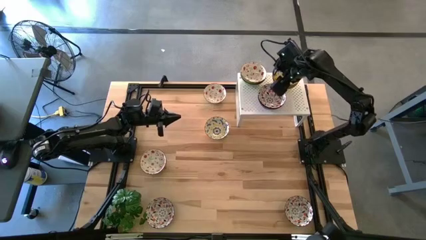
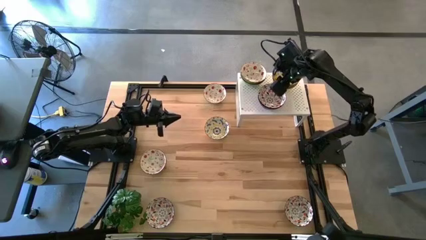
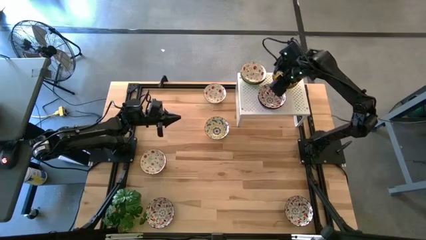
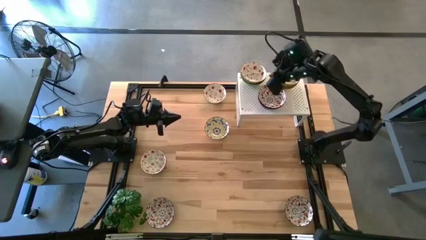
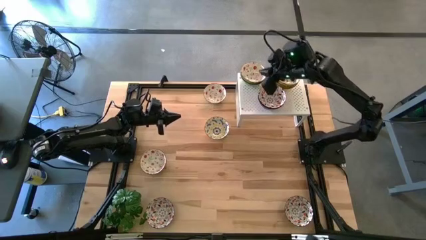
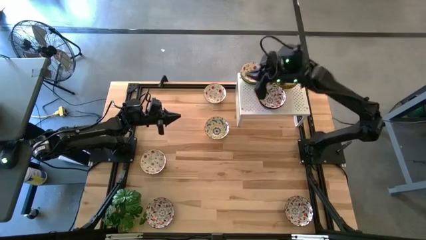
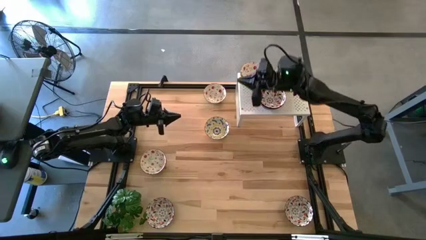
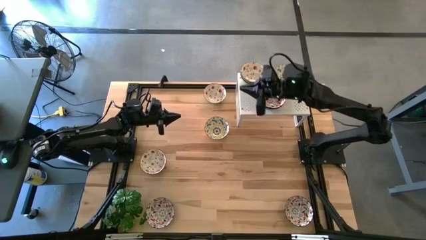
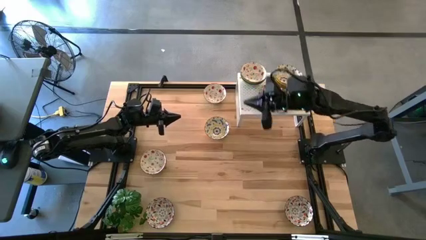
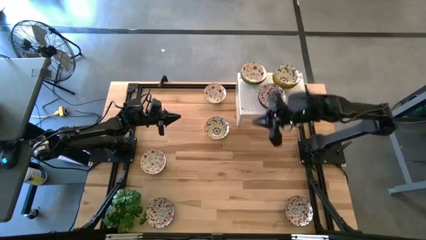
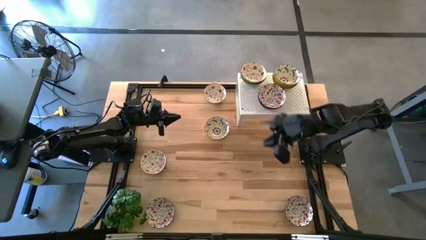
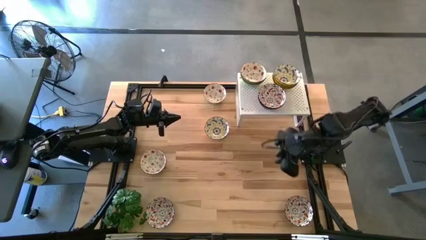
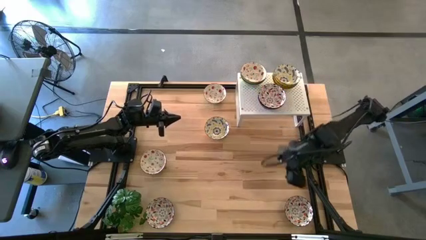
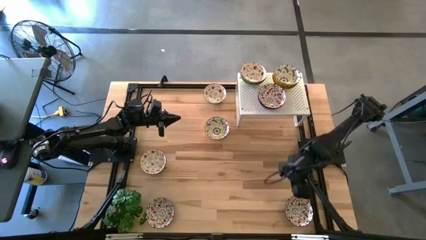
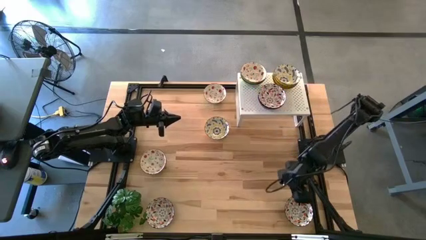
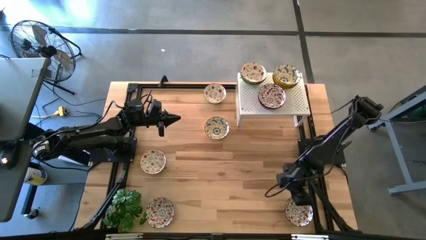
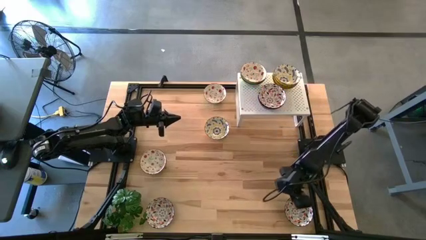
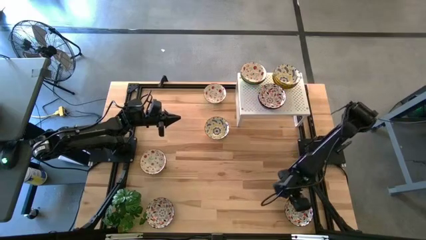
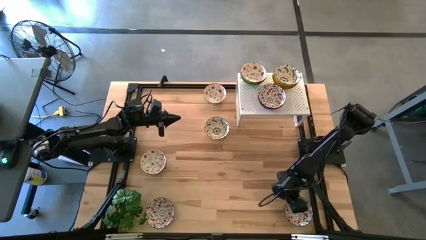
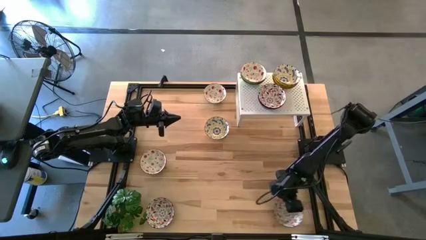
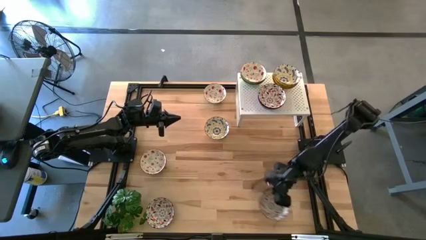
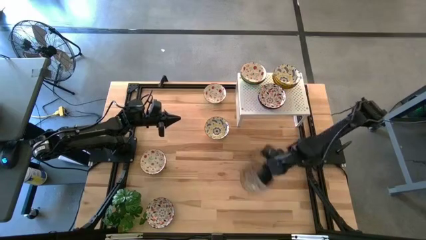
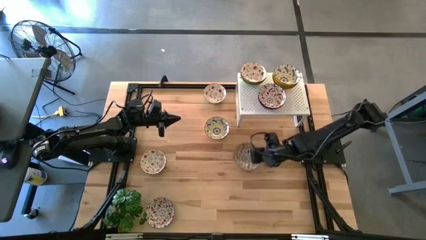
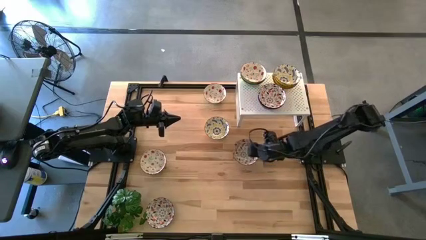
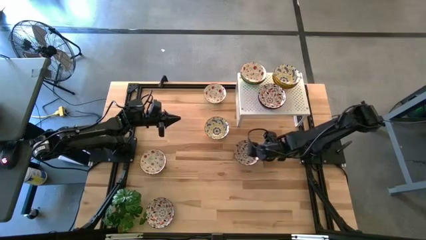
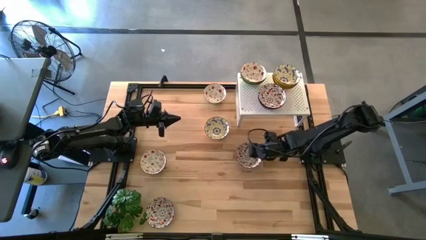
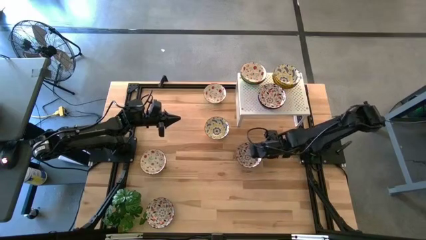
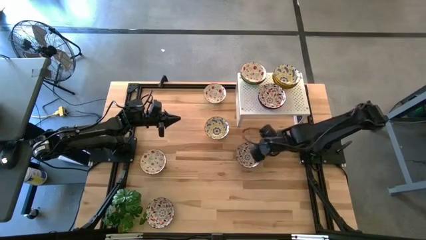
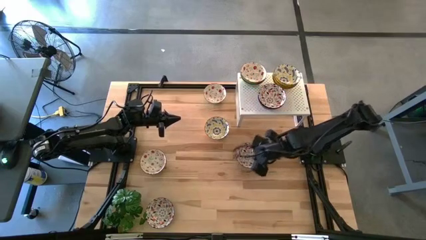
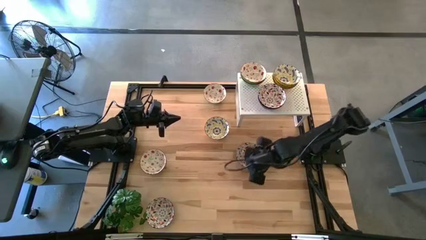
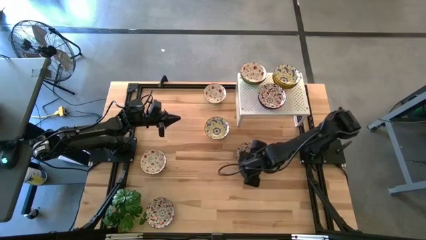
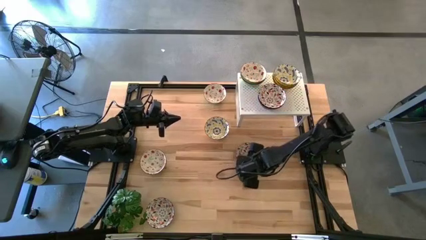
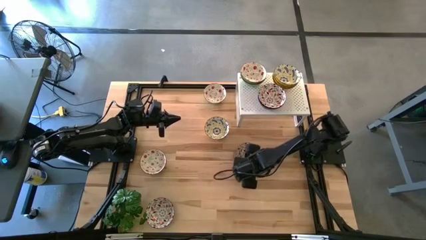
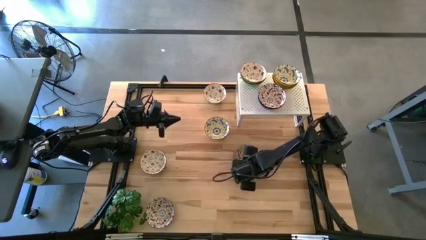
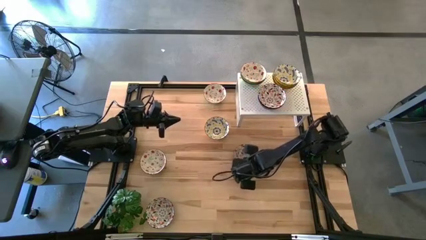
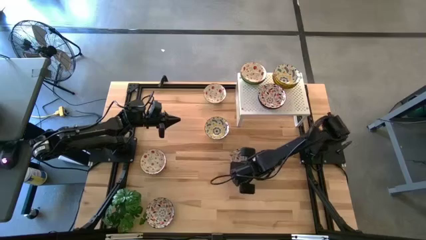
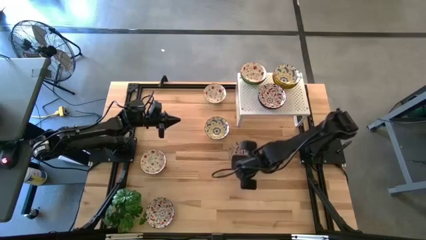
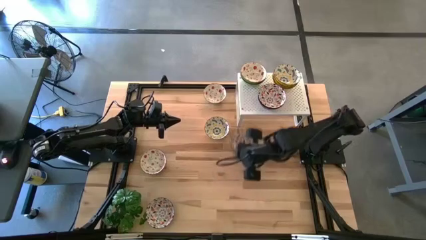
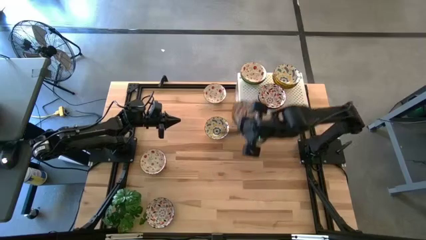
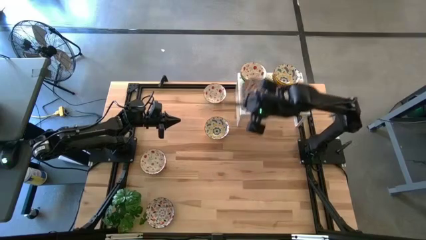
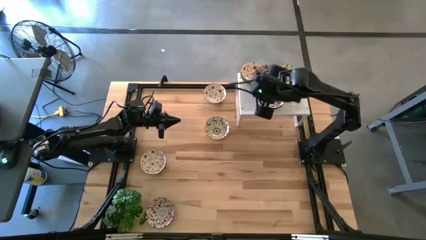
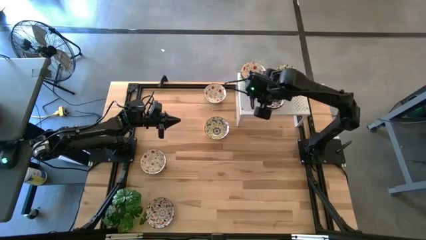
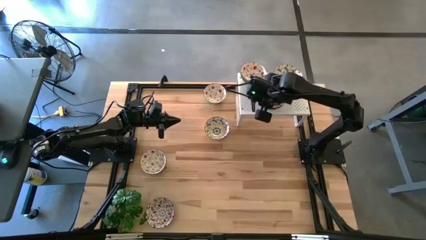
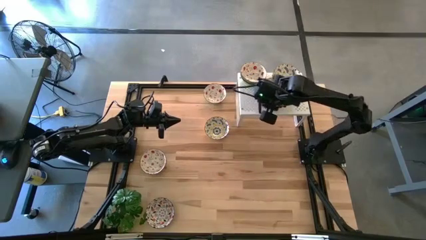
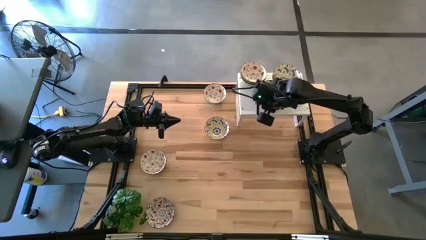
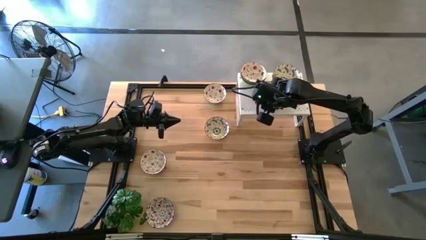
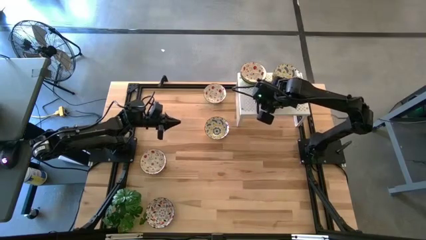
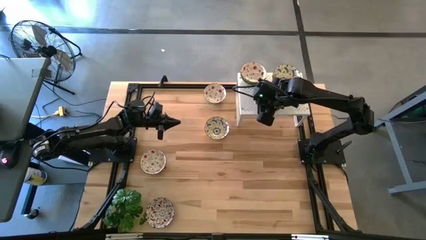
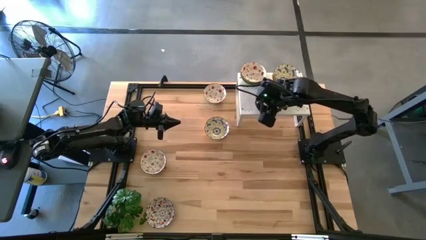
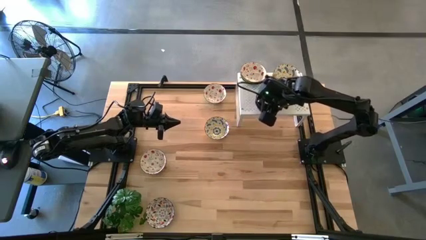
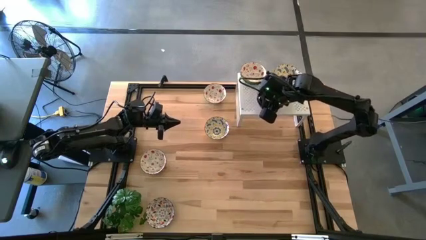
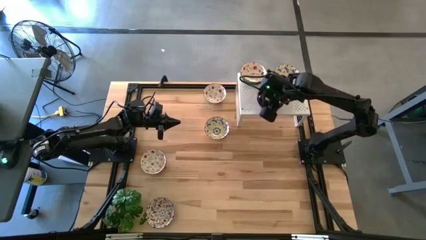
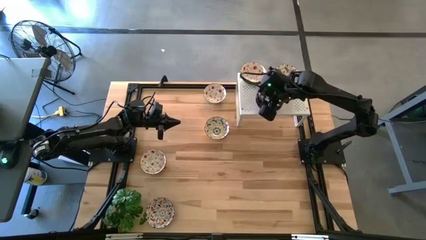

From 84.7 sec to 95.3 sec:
Task: Pick & Place Mini bowls
Stack the black patterned bowl on top of the black patterned bowl on the shelf

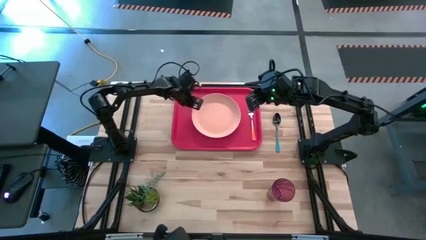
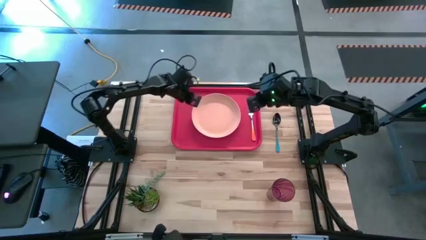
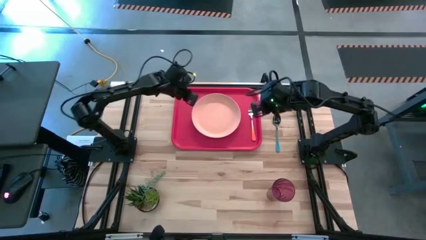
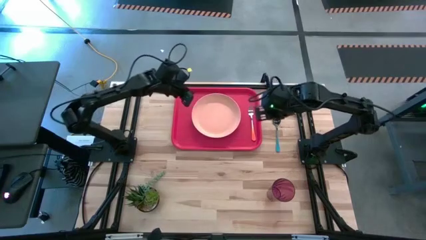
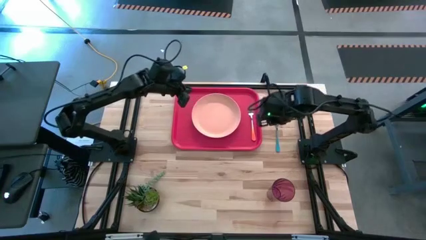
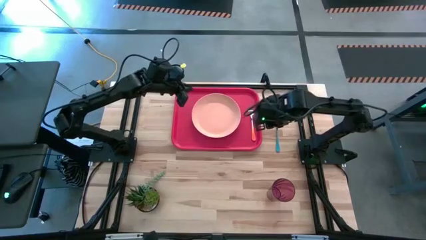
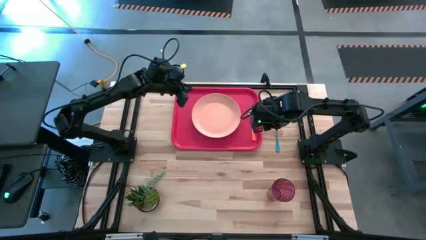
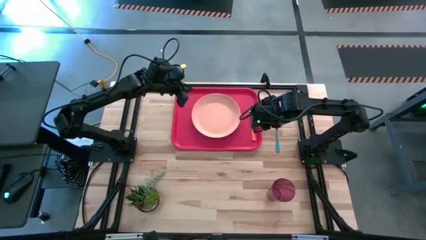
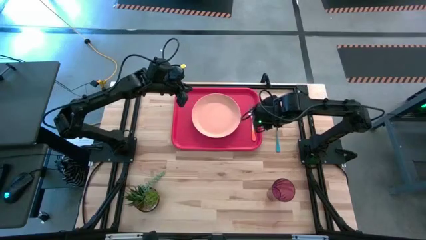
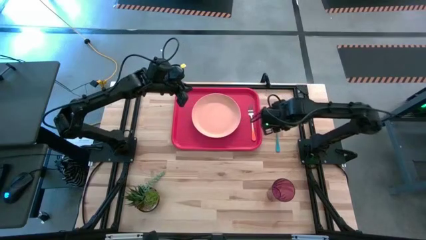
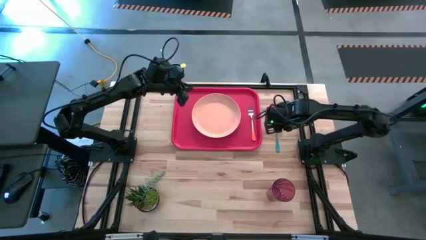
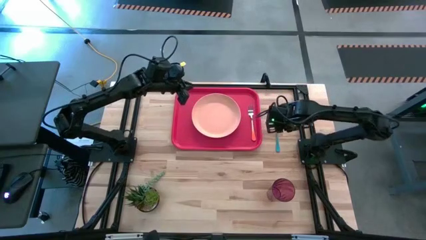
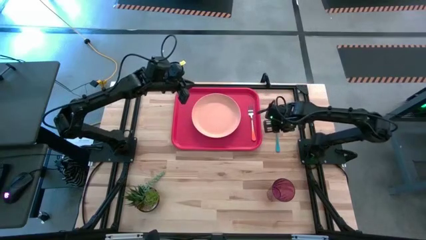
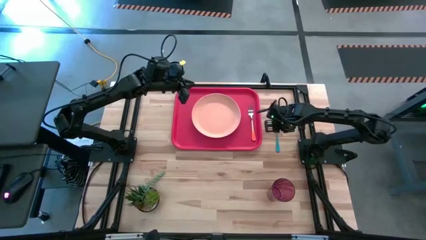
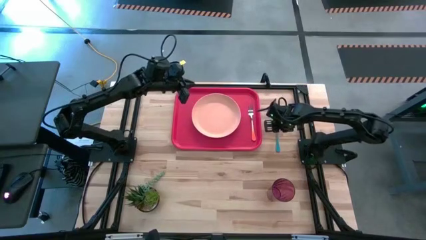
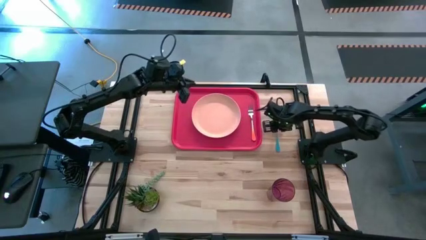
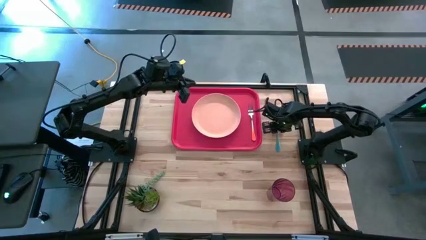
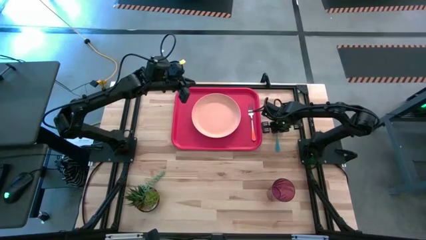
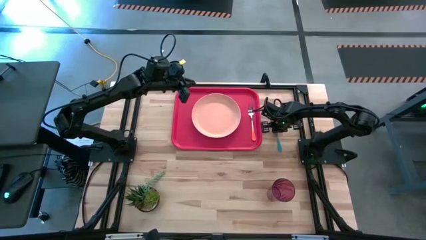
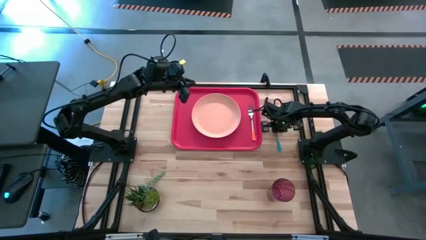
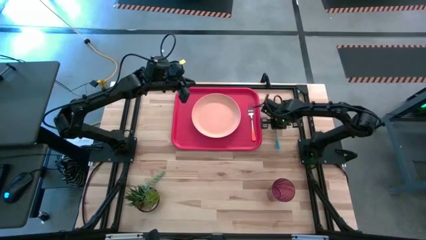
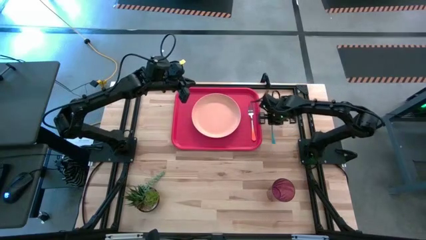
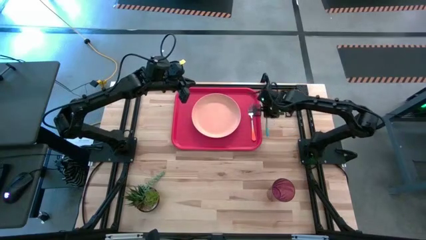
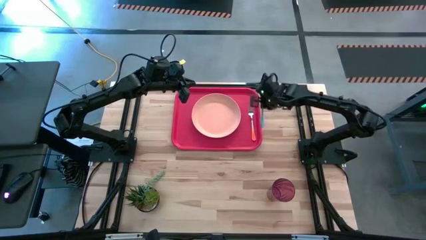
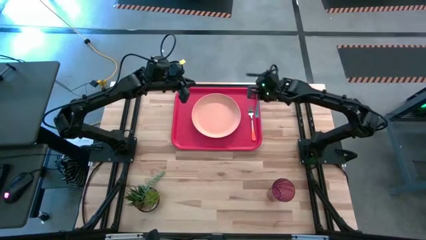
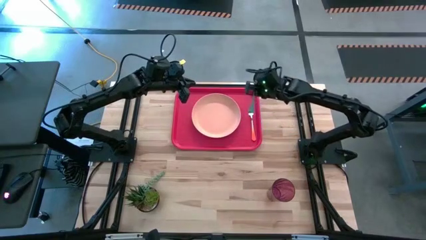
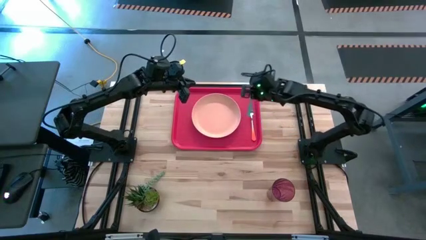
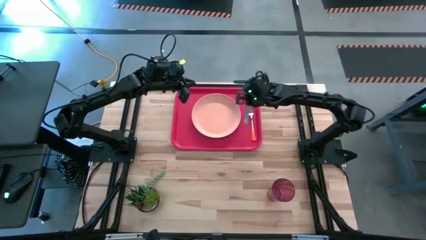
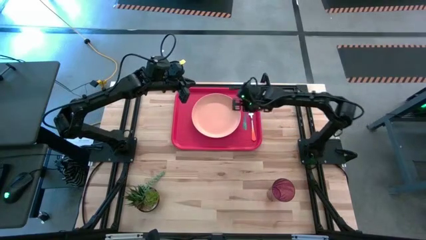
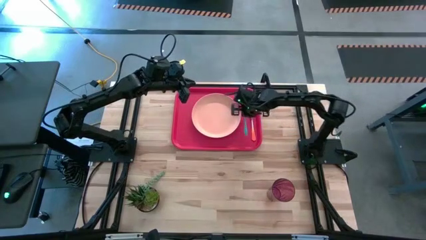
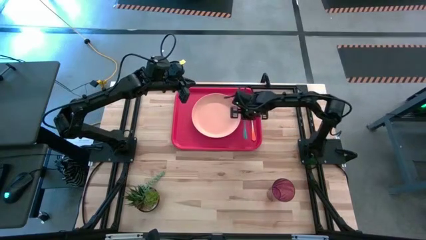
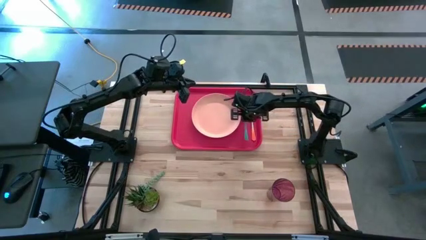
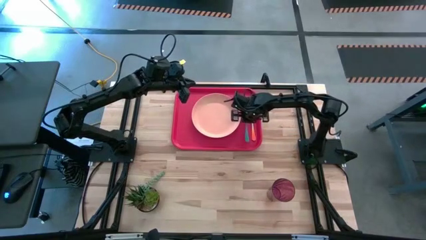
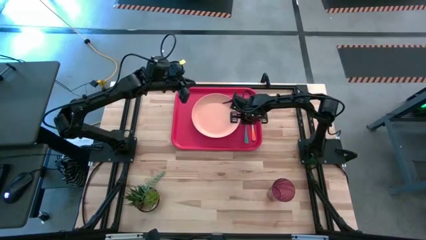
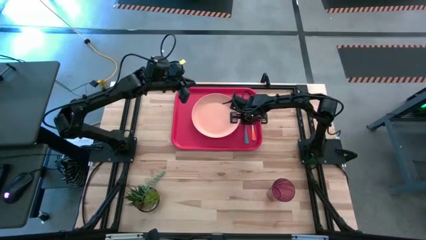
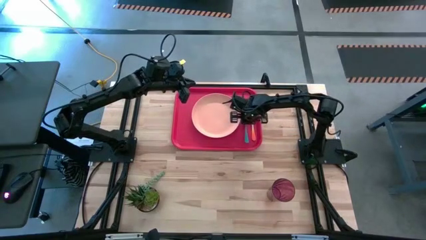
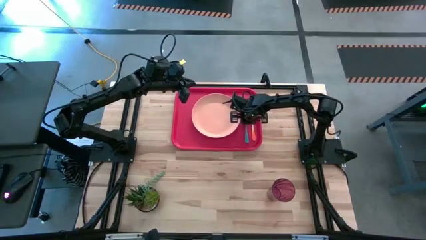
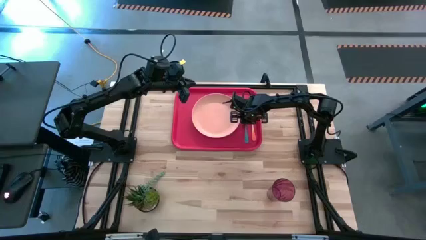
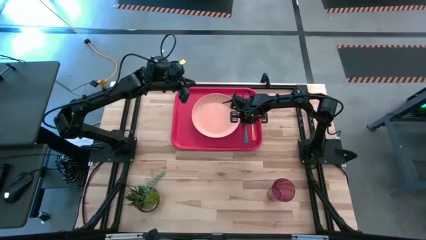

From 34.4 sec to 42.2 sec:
Task: Pick and place plate/cup/fork/spoon on tray
Put the blue spoon on the red serving tray to the right of the light orange plate
